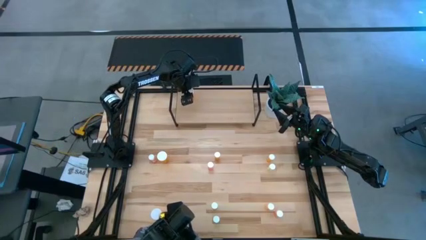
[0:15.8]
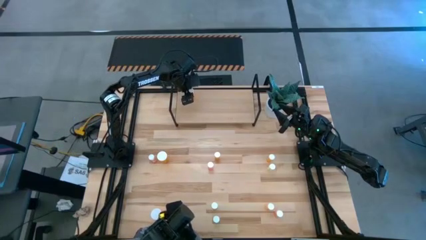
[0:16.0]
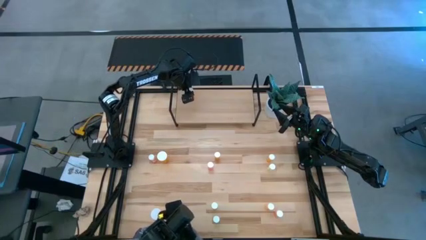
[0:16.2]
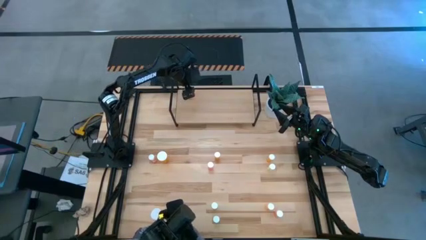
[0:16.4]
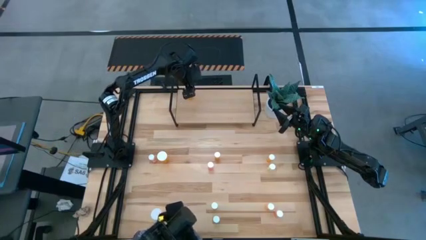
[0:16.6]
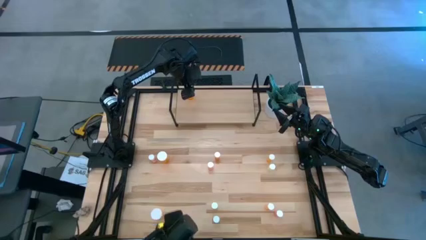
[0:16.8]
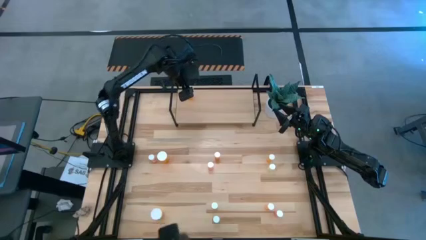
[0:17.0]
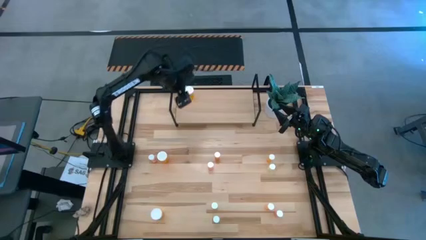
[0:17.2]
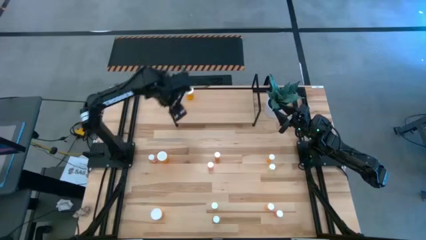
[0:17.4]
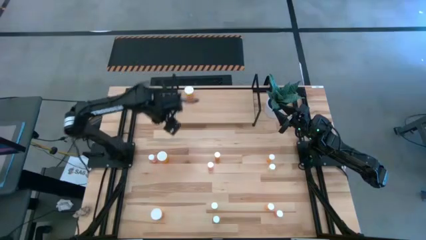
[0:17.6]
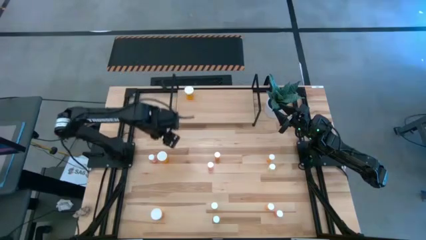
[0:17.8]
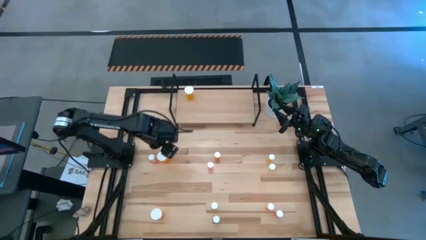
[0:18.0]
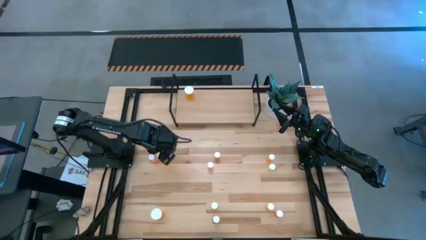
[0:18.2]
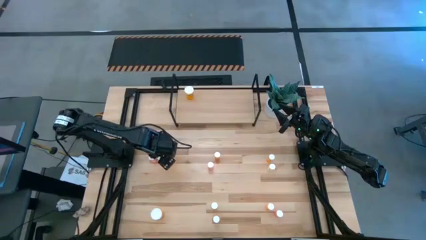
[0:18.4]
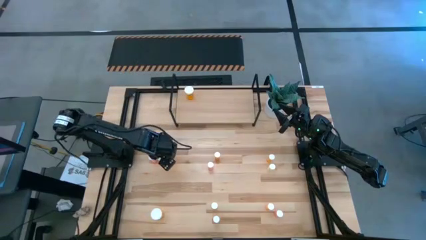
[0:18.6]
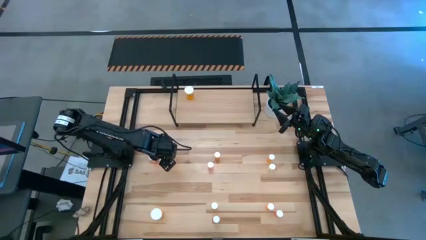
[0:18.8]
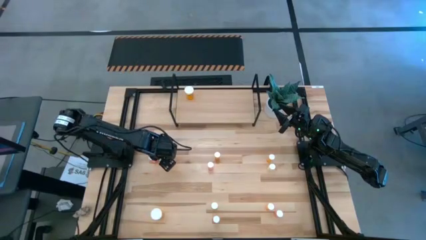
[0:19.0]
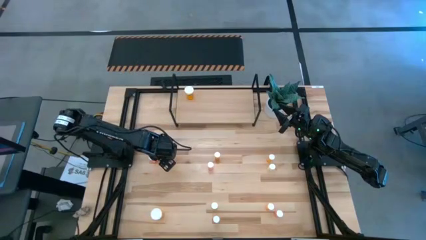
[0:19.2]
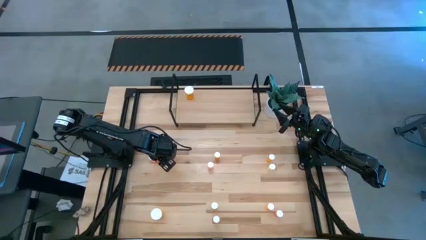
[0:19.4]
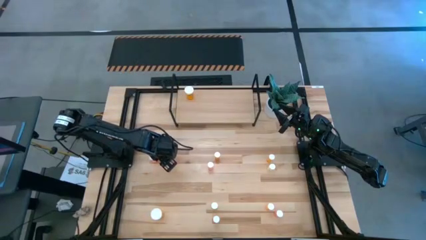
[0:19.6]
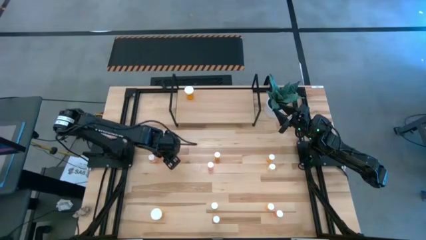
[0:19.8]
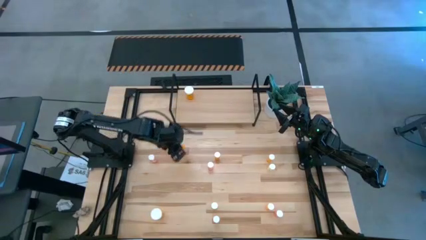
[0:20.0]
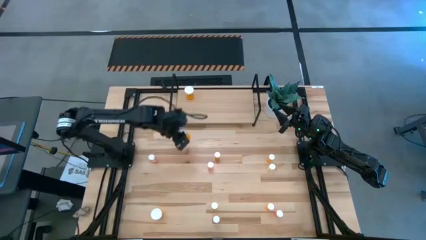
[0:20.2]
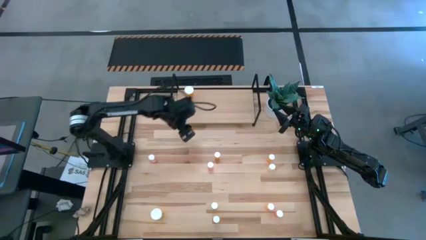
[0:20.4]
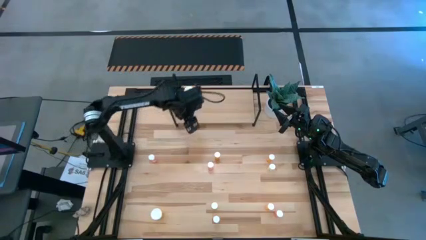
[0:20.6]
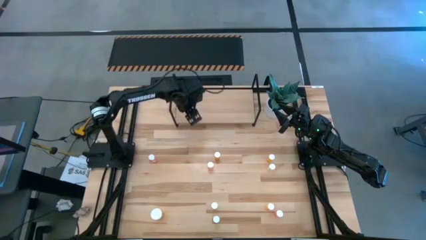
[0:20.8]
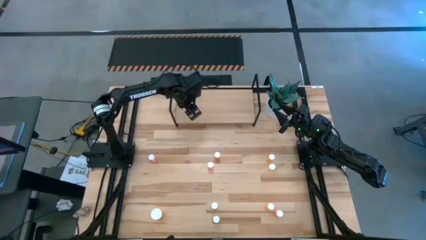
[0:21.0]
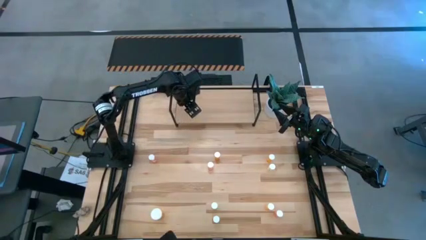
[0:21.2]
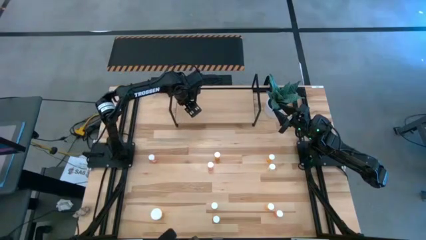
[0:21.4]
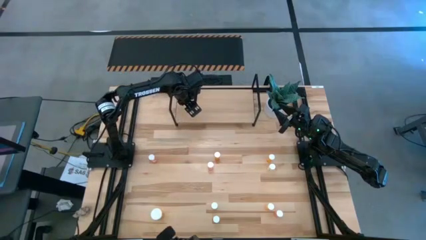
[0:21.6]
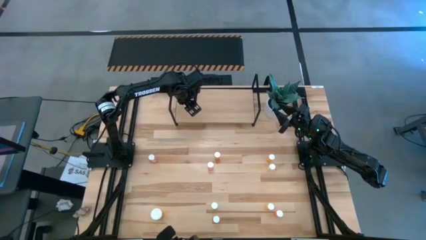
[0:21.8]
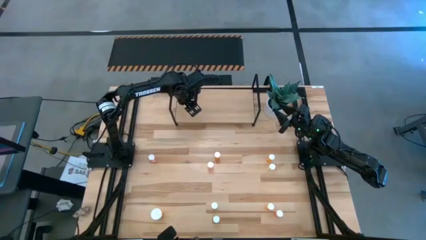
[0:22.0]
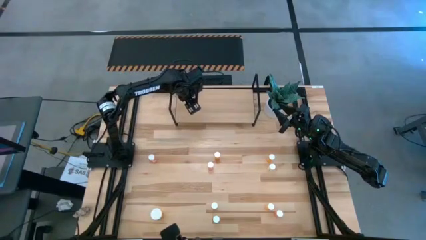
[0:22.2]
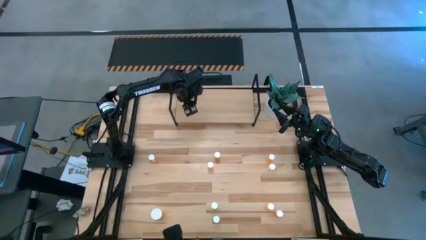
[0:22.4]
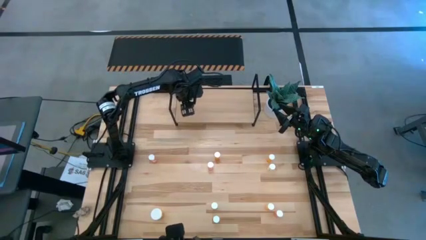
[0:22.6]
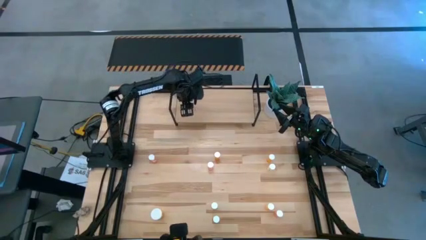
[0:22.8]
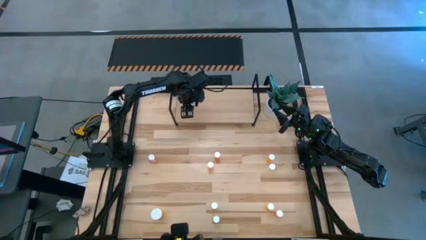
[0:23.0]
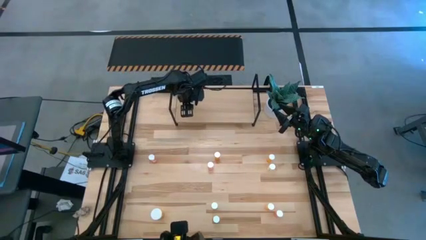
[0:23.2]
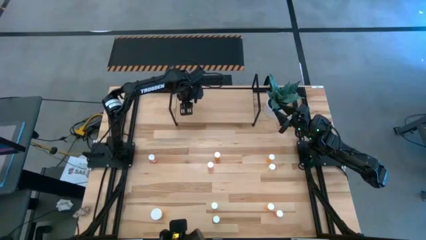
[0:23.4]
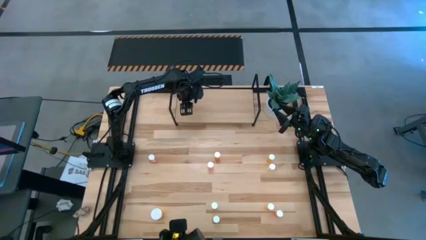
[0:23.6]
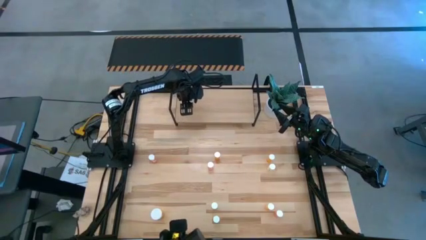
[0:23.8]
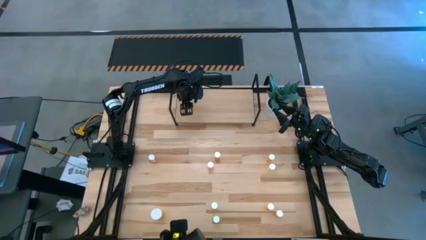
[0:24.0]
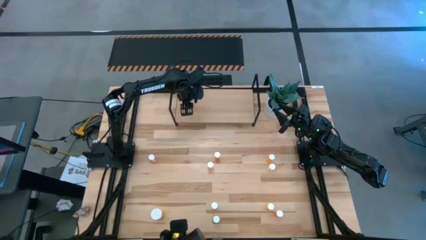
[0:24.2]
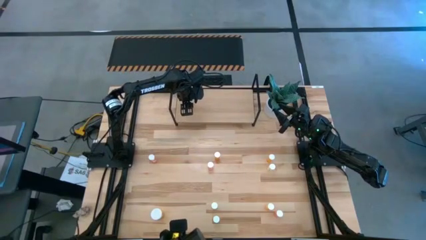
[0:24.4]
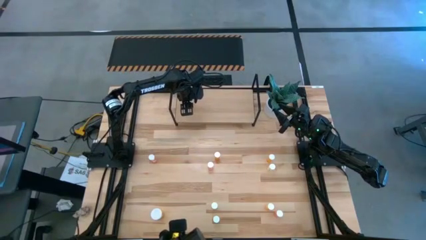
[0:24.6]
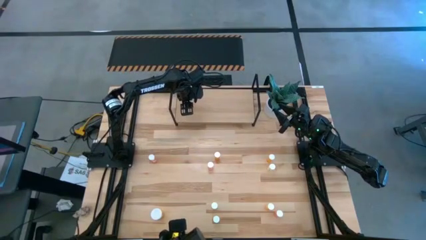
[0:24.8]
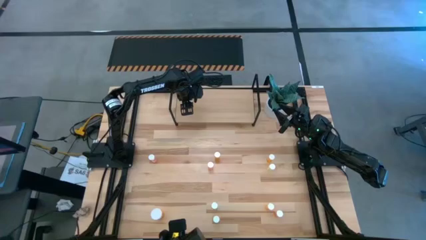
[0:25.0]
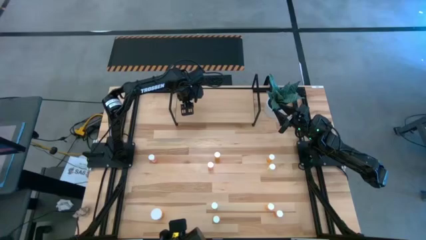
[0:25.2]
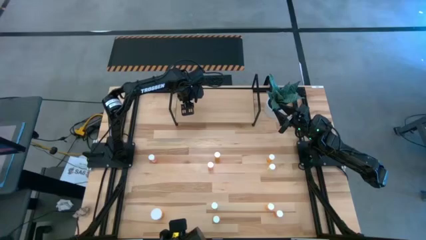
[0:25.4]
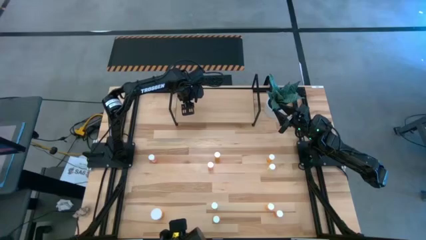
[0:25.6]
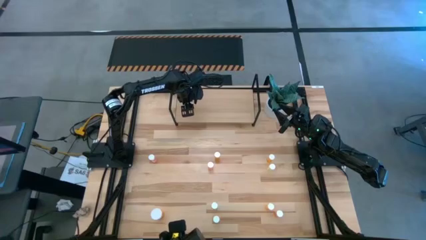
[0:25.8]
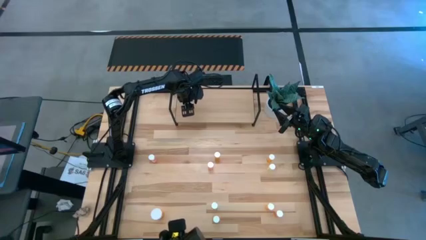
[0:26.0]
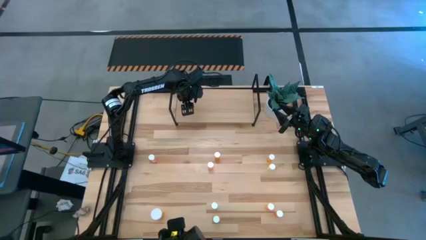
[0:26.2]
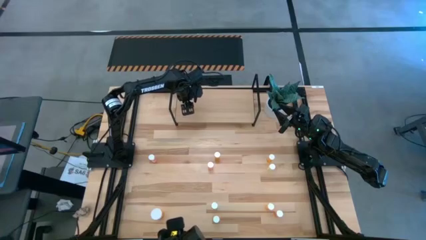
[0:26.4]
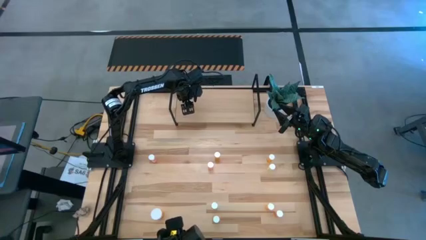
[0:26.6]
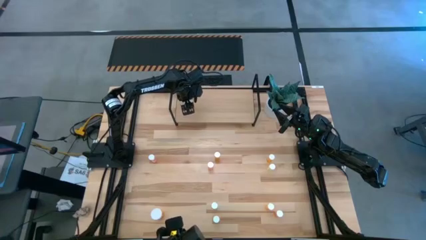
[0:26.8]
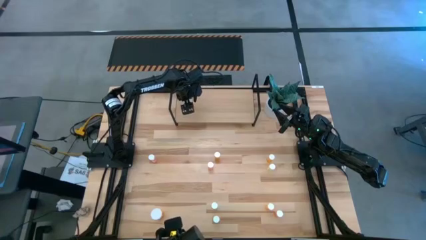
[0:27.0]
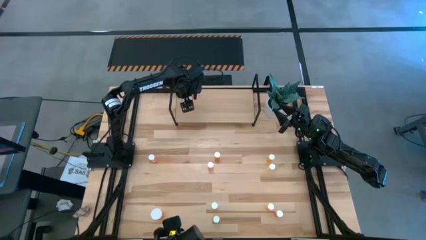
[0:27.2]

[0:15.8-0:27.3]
Task: Pick and place medicine bottles onto shelf by color
Put the top big orange pill bottle on the shelf aligned with the other big orange pill bottle
